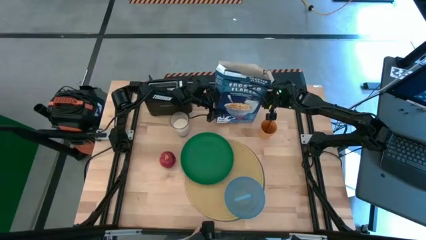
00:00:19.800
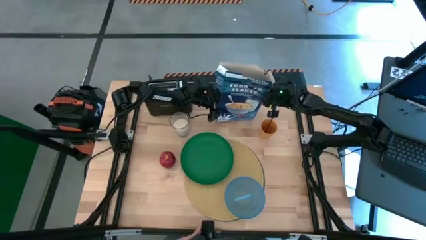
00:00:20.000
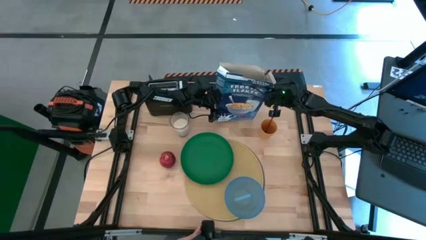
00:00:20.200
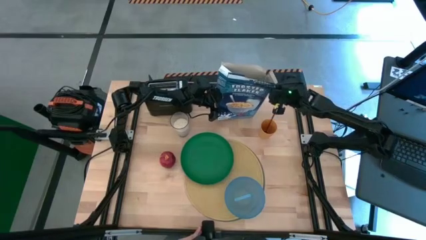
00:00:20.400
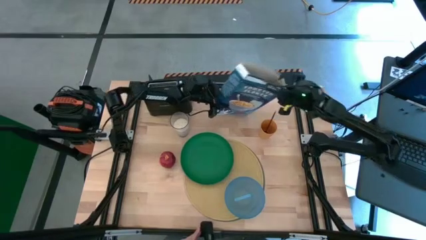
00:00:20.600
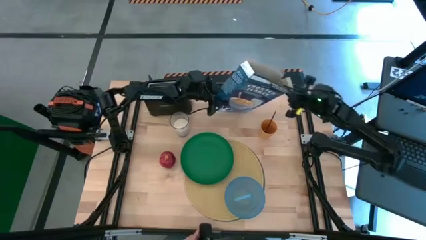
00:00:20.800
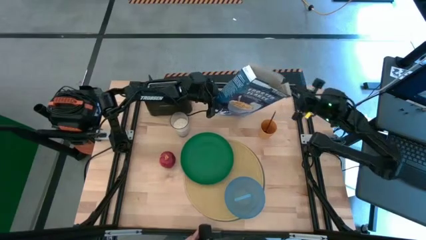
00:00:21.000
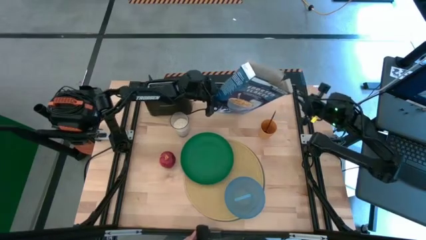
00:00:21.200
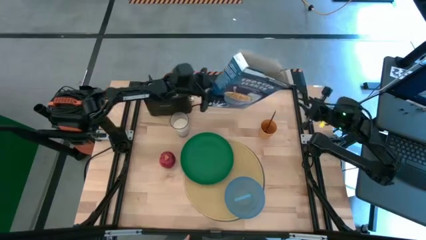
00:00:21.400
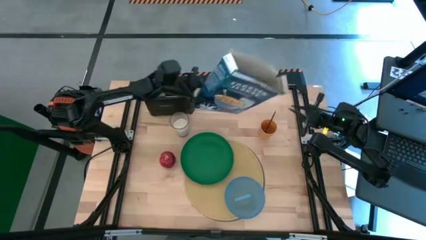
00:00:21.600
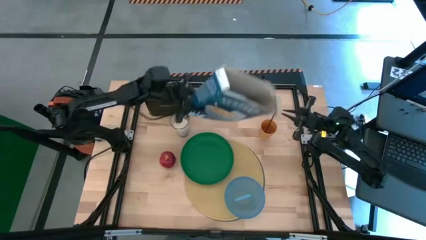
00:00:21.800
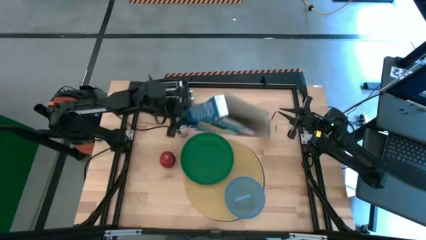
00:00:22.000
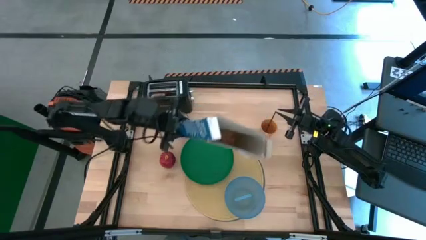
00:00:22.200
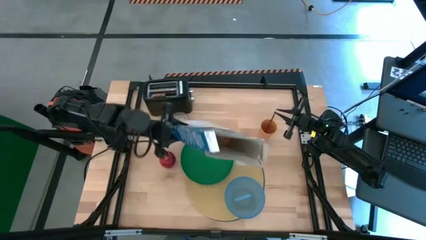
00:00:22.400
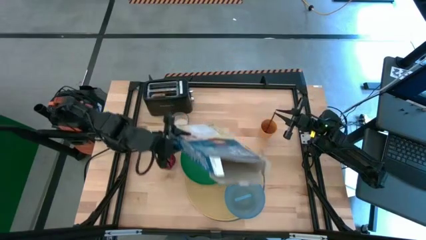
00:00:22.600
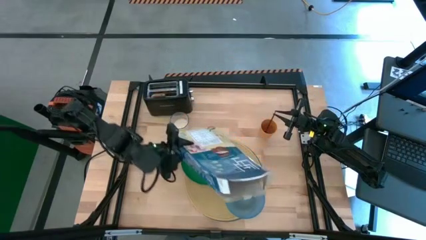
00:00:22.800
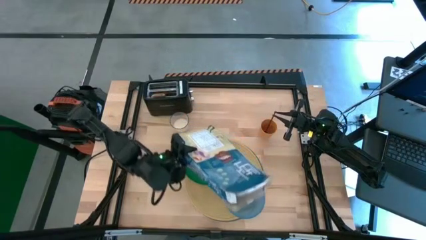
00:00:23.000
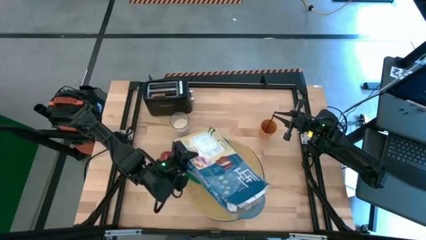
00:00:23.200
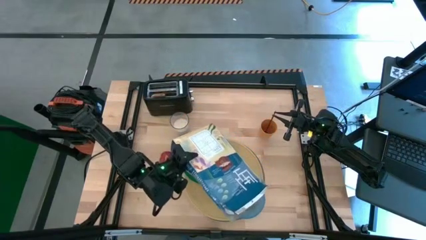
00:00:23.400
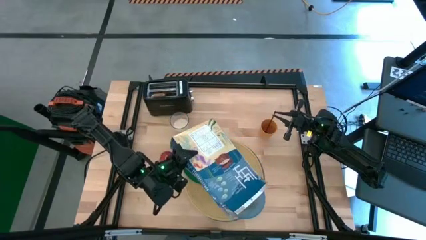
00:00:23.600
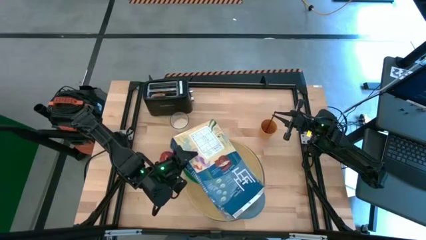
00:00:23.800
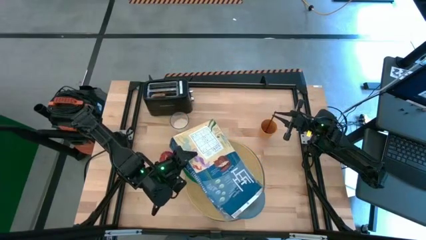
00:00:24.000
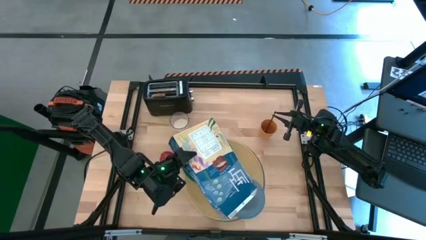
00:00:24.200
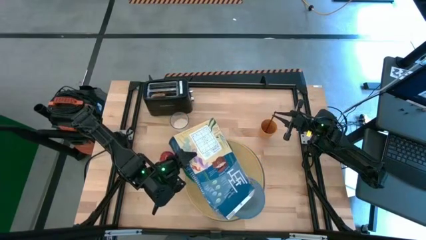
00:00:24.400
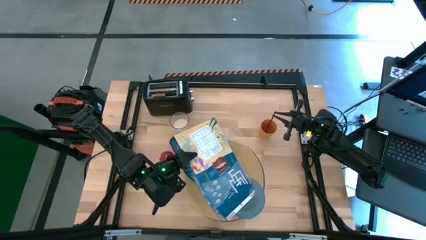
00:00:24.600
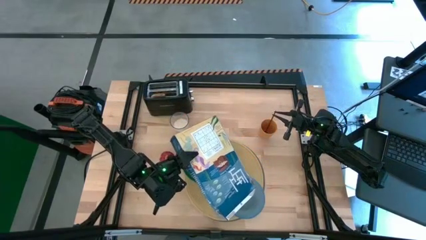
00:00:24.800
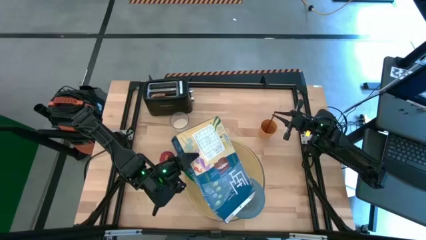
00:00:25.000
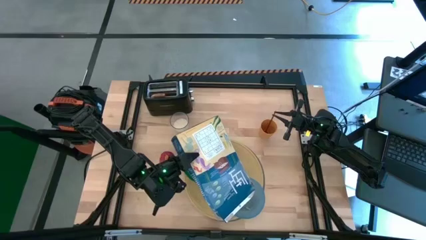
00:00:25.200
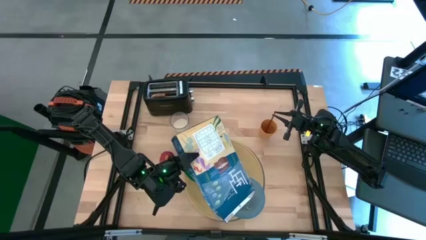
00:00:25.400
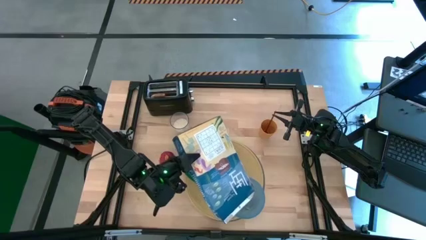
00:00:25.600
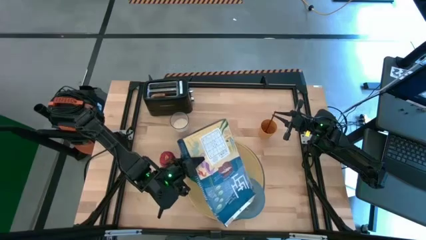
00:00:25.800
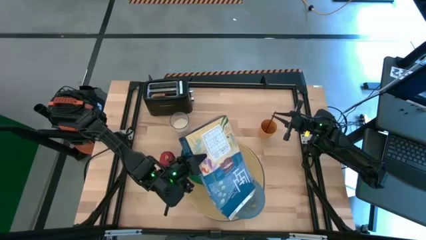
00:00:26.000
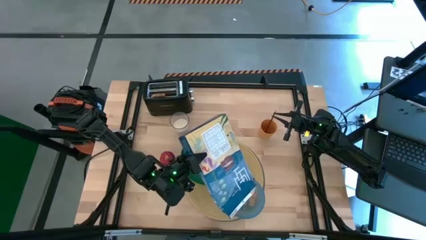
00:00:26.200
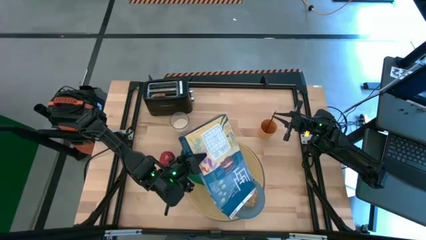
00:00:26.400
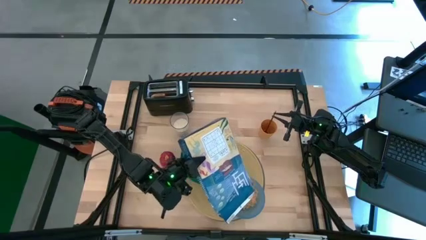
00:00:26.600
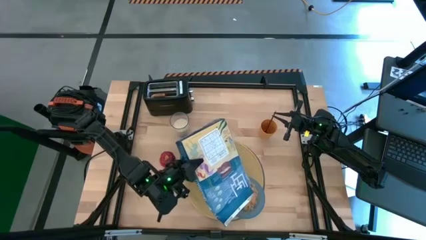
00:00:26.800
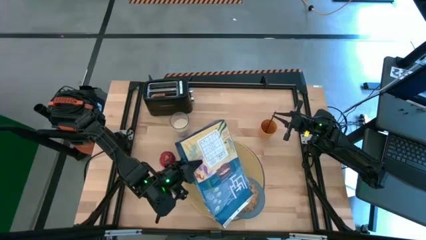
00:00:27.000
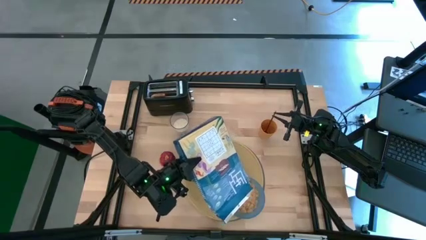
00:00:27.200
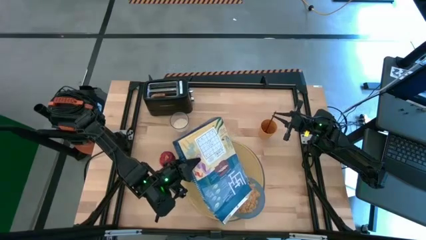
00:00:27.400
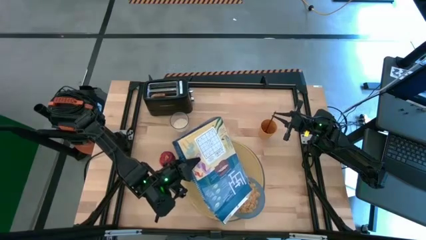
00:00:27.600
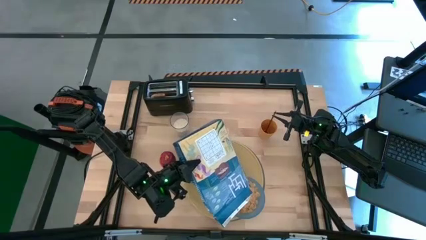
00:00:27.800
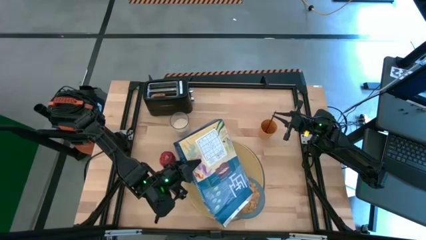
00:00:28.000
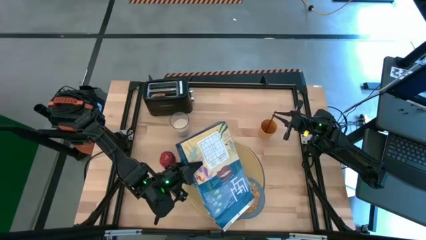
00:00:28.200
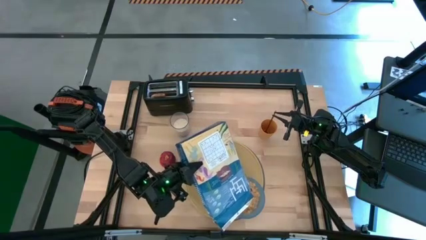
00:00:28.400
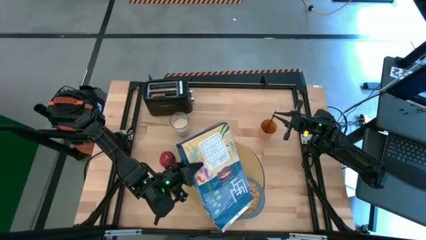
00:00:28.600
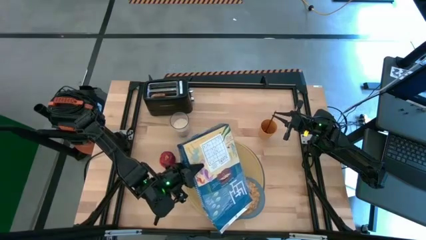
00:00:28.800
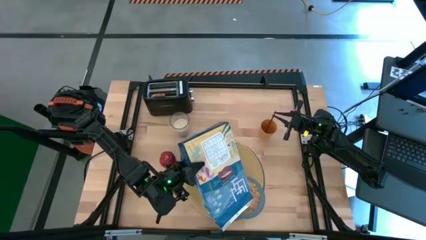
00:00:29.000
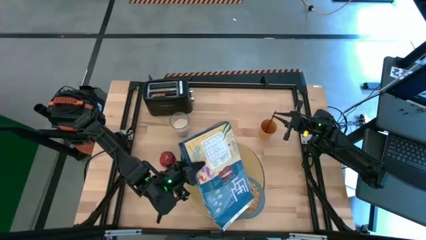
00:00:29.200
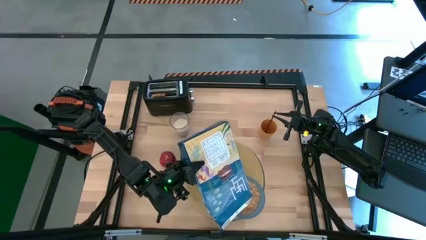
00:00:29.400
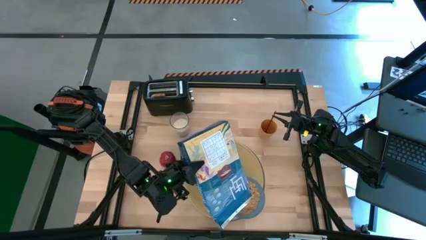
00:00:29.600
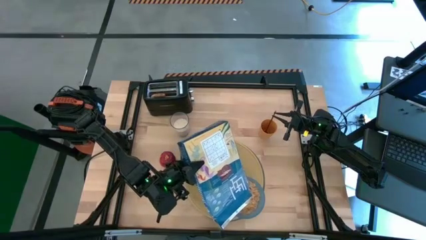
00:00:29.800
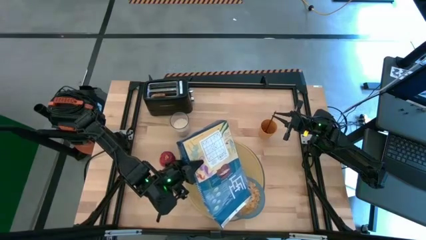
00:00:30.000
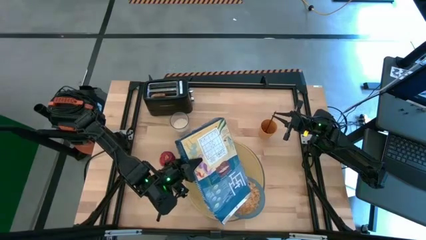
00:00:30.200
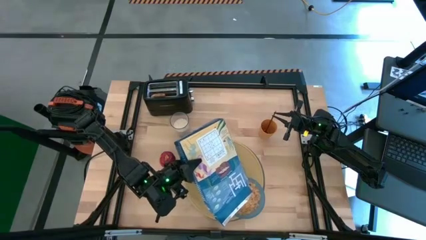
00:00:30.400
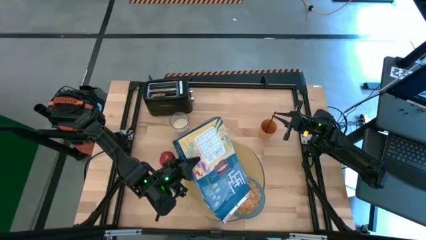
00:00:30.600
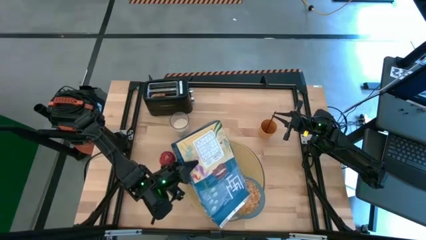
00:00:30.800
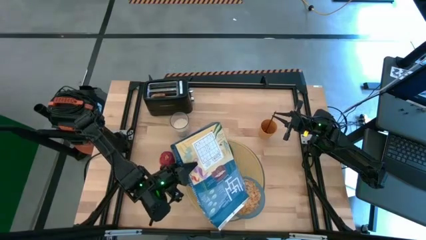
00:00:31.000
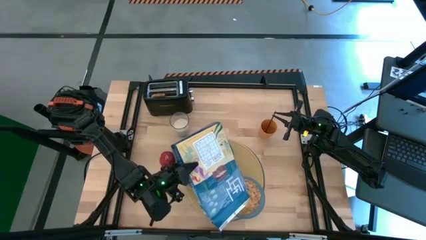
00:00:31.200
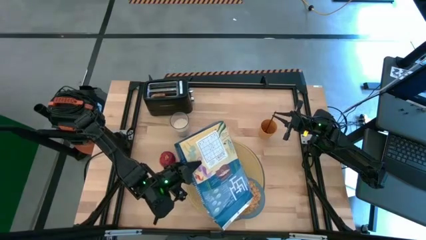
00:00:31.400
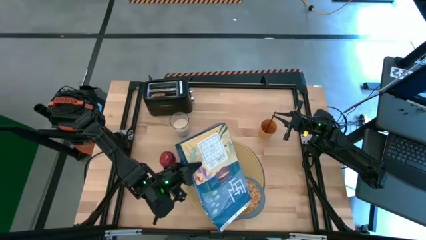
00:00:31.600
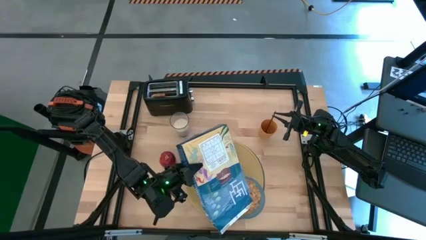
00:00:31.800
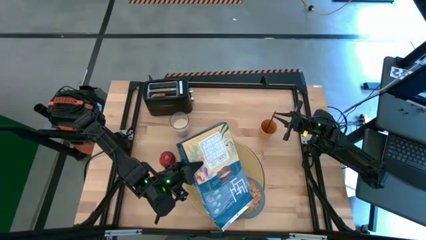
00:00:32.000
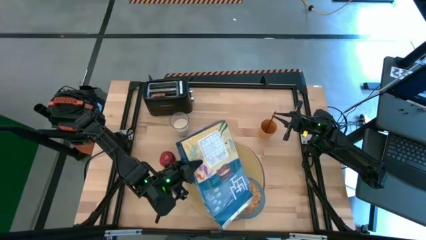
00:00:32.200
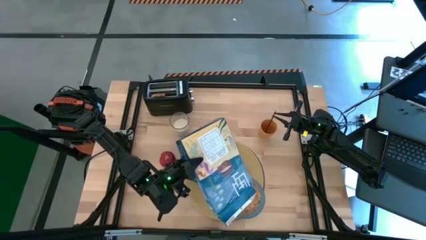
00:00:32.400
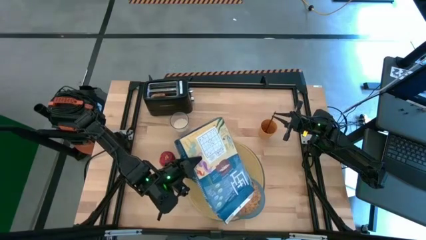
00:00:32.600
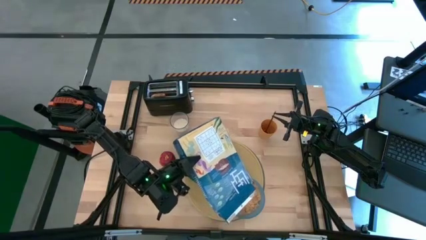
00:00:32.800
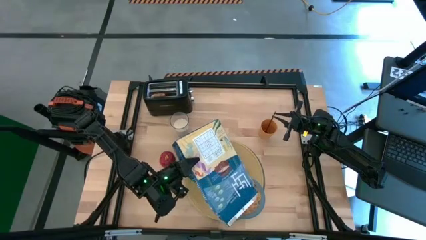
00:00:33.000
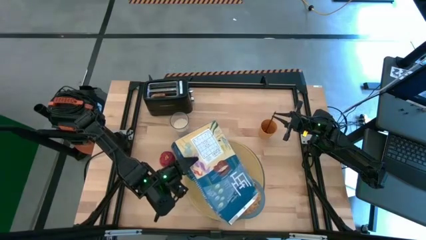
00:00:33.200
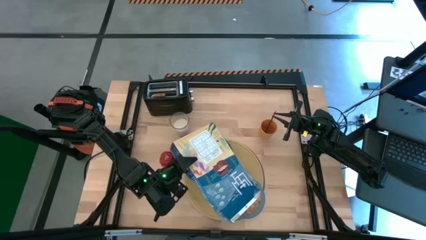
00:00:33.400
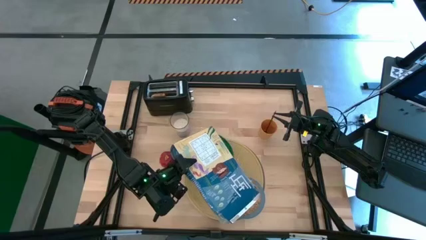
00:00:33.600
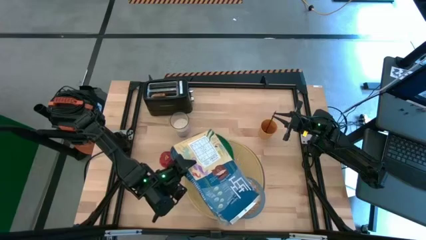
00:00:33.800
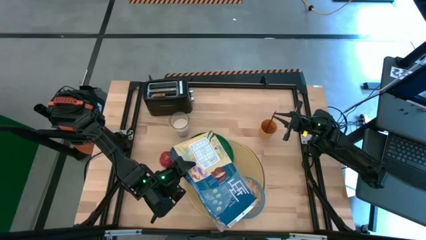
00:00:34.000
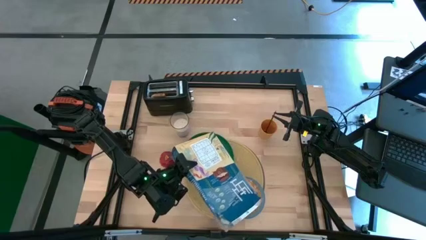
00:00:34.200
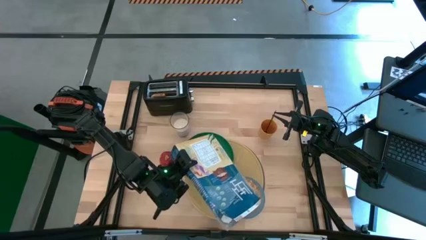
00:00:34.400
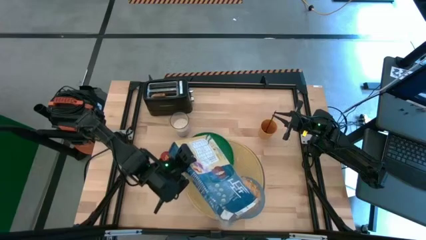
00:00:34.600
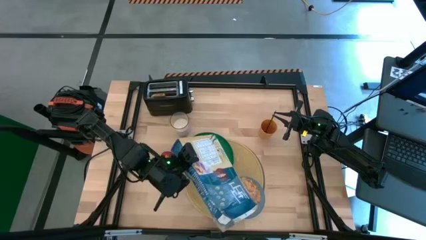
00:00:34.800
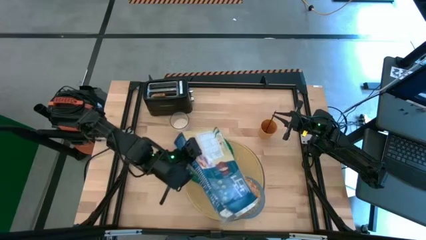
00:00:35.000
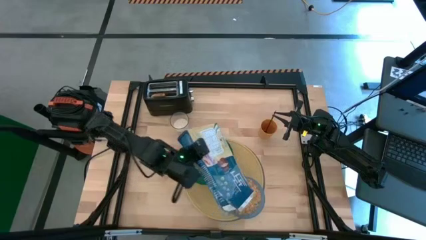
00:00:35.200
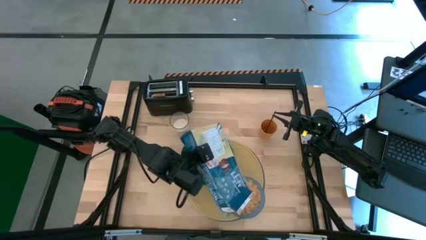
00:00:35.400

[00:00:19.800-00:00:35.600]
Task: Arrange a breakfast setting
Pour the cereal into the blue bowl
